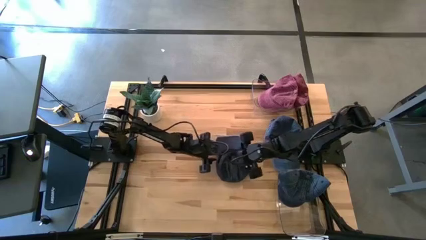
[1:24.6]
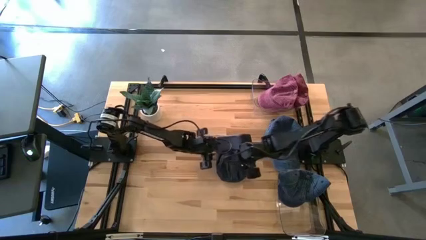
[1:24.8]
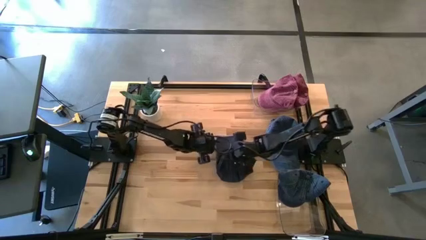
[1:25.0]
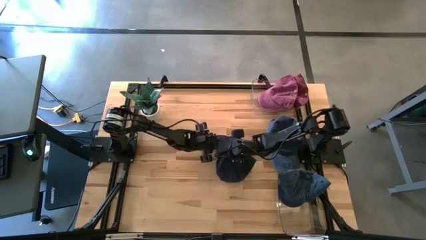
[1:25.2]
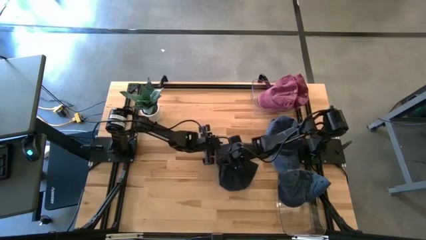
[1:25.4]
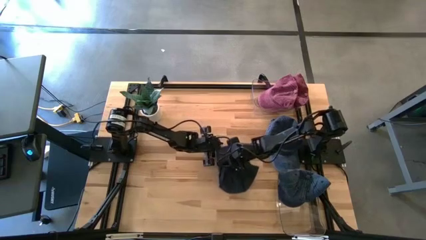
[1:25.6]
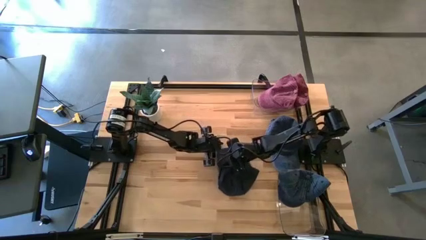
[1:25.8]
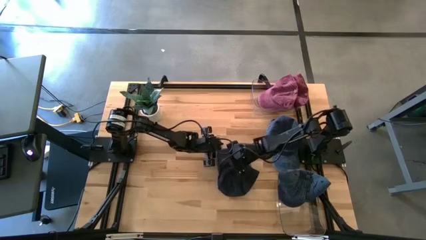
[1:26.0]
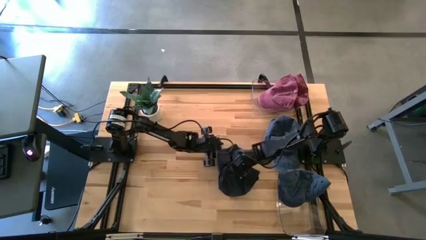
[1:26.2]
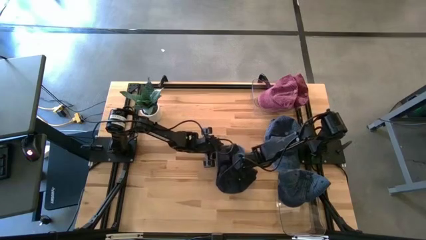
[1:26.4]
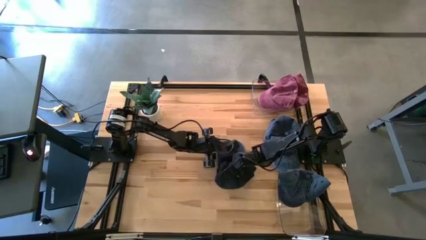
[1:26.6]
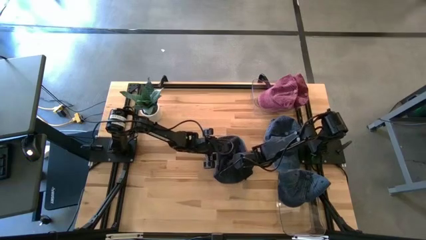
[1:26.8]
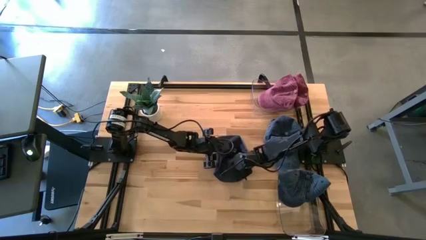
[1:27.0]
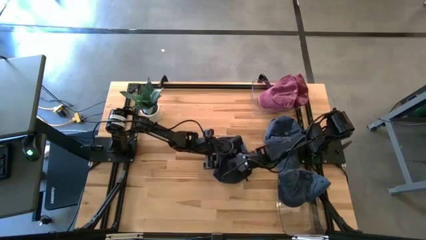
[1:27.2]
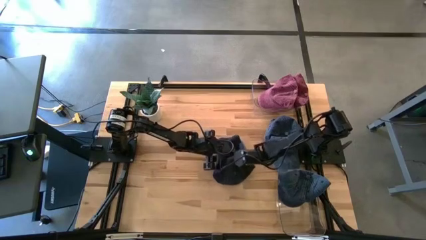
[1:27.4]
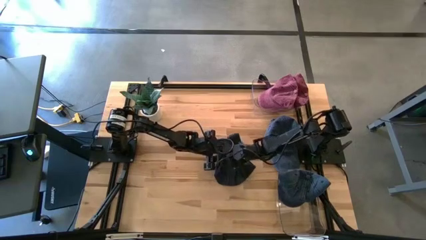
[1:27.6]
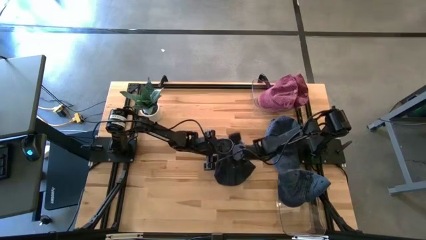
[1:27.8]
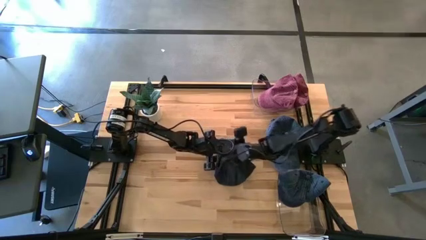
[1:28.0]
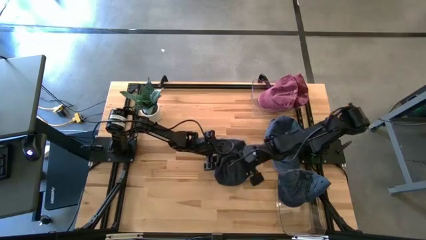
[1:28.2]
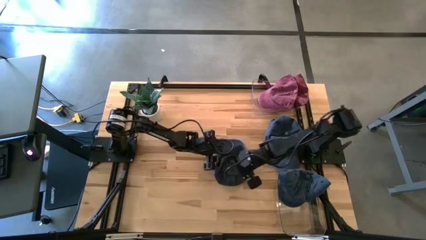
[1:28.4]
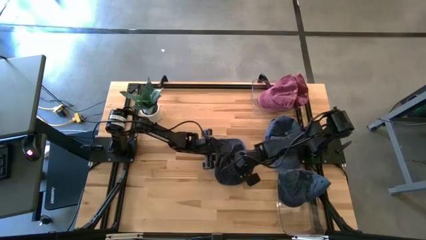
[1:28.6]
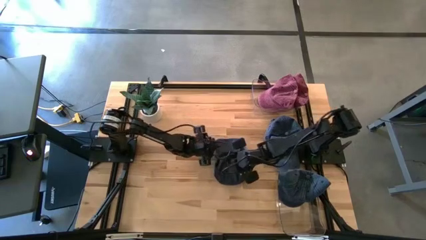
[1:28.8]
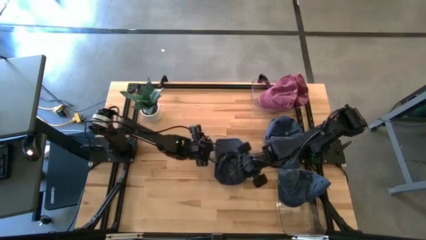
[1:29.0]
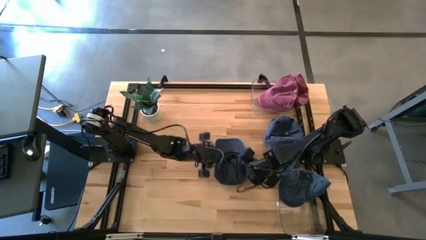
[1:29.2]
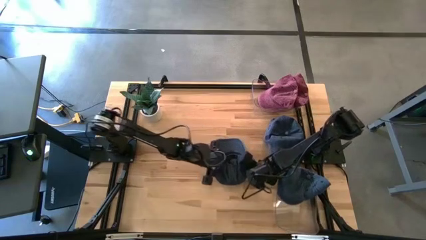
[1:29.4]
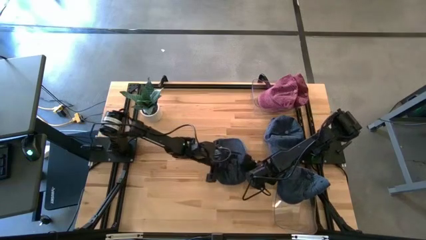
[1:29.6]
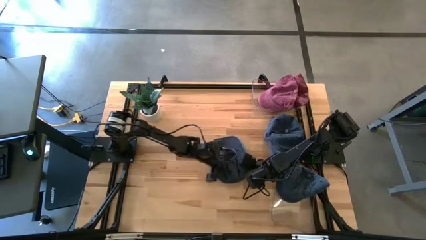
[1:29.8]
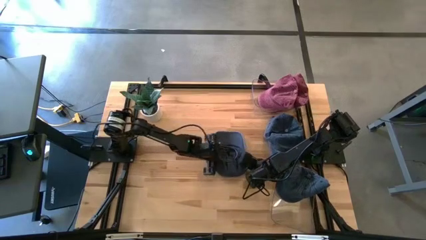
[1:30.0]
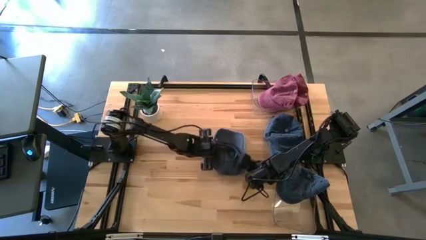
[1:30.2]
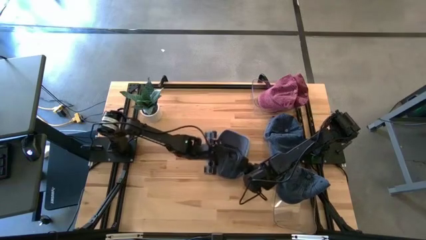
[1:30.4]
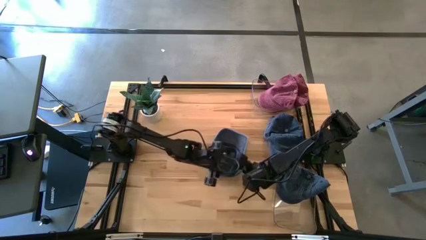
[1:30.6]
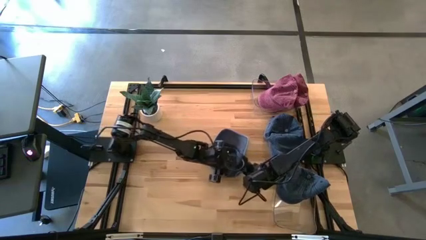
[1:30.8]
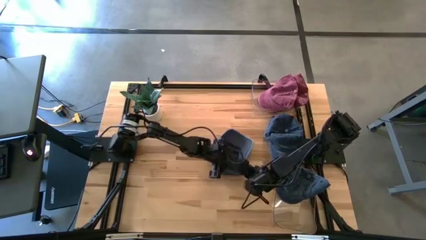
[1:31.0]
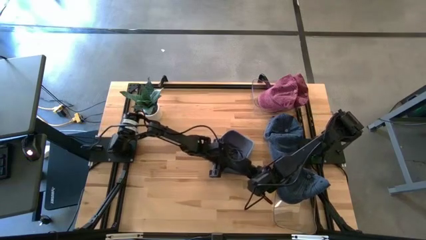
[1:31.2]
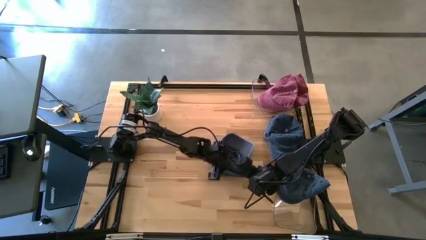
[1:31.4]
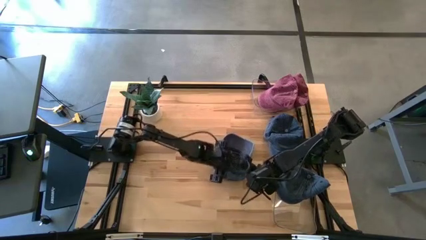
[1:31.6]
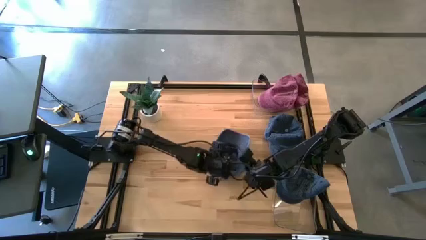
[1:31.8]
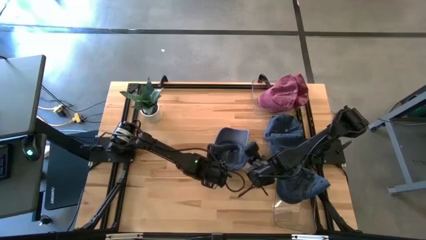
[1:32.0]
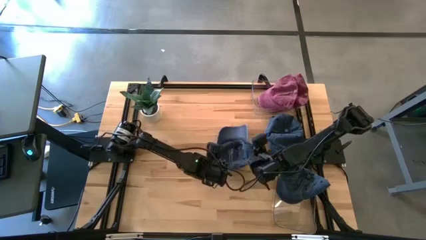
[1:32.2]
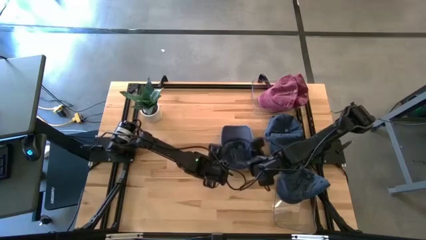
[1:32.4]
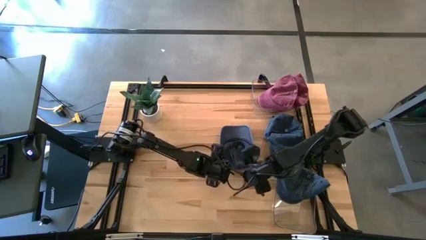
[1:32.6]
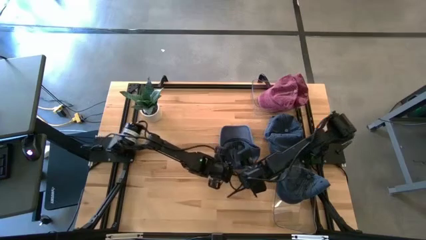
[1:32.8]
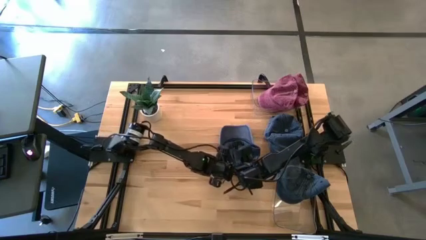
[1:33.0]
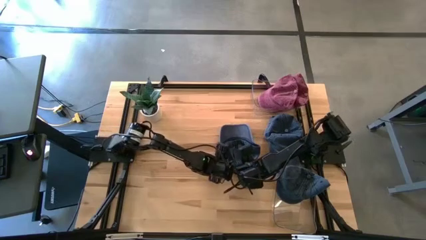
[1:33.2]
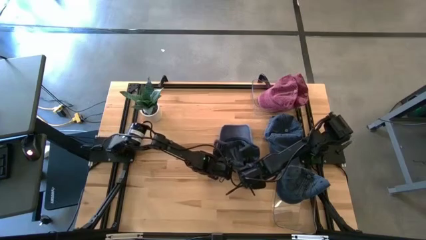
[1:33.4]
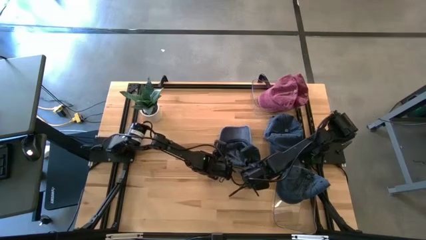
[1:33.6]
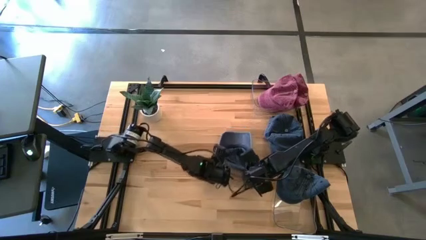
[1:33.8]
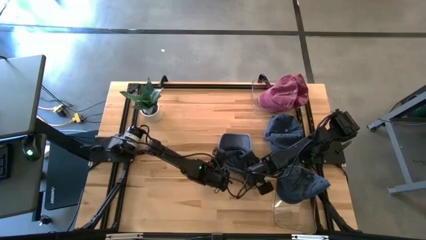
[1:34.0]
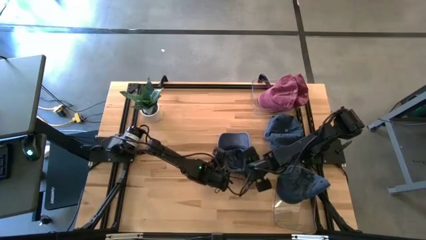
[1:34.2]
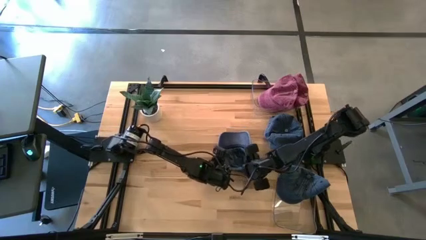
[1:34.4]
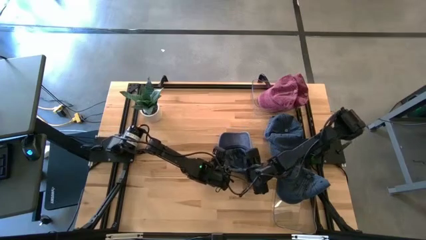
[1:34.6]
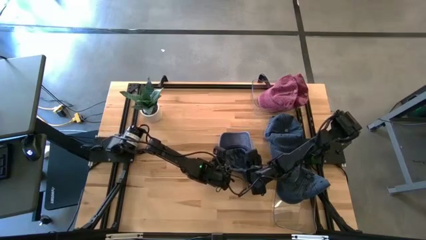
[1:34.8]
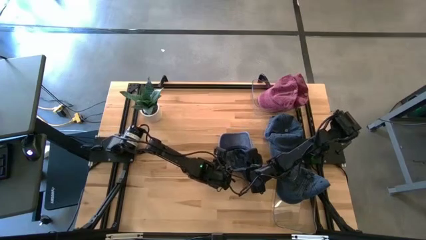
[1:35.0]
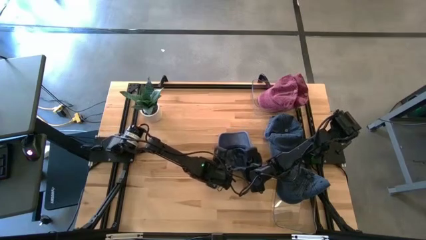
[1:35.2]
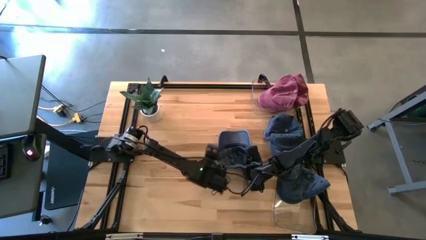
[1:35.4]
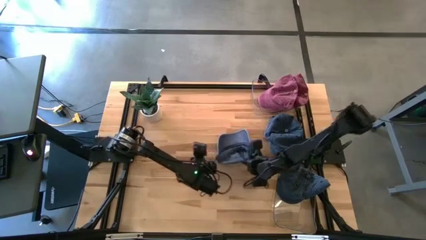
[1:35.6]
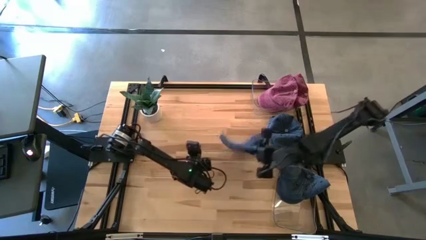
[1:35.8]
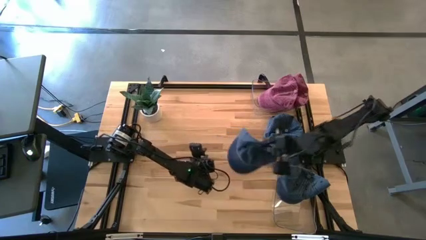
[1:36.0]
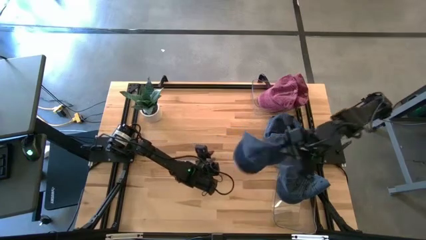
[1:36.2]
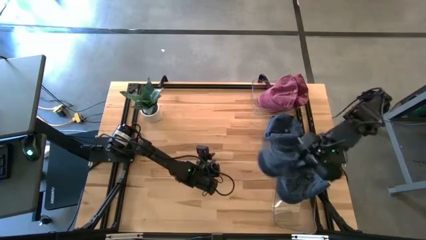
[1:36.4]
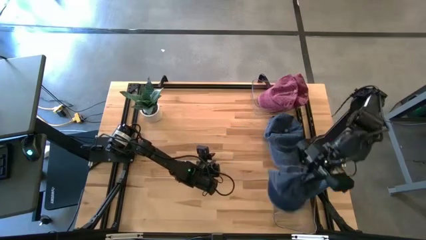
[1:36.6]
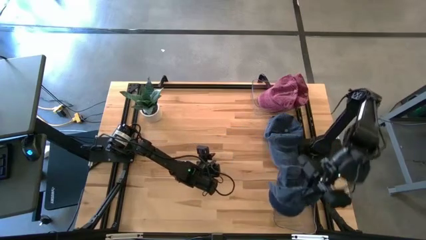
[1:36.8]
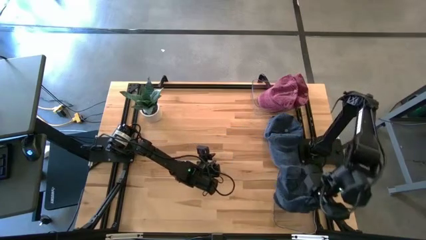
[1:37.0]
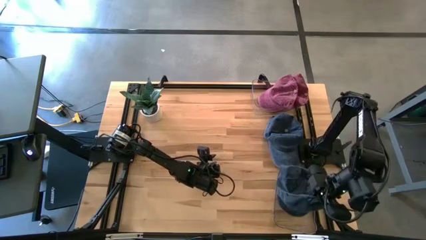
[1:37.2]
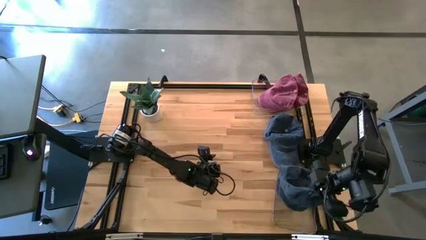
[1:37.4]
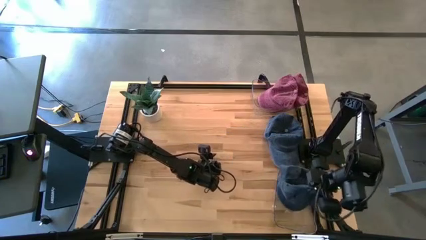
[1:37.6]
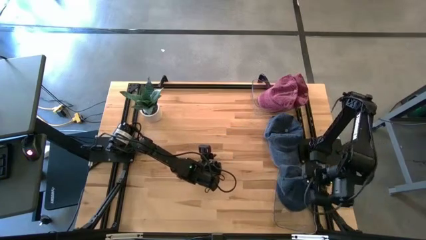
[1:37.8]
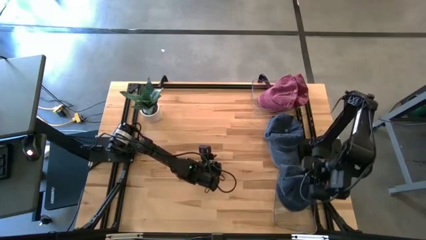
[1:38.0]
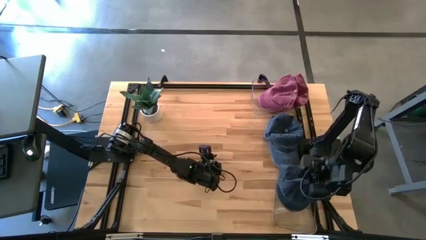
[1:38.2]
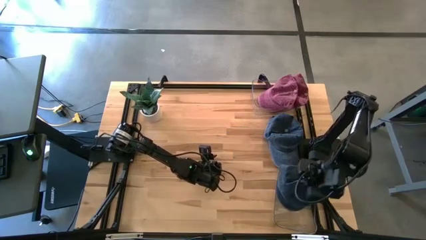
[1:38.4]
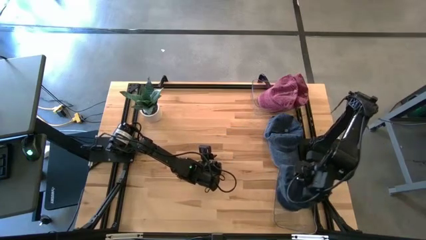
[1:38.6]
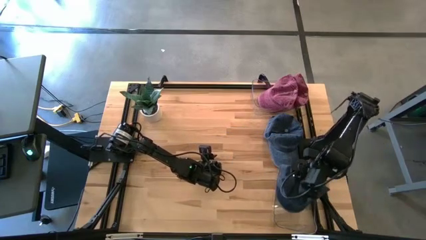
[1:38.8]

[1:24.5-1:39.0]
Task: Pick & Place hat
Put the left blue cap into the bottom transparent bin
